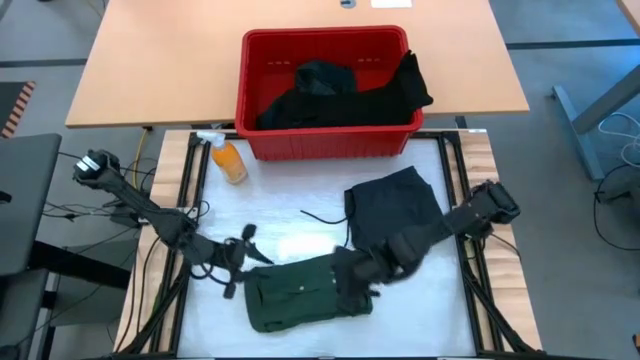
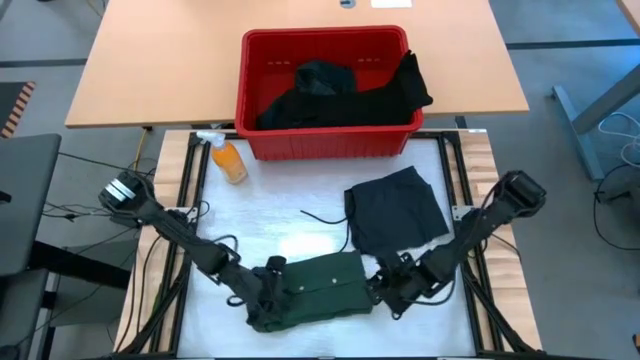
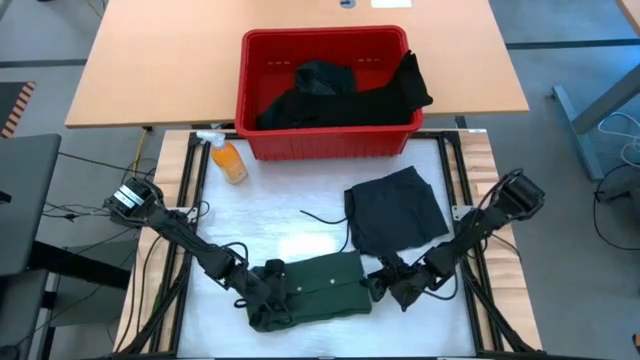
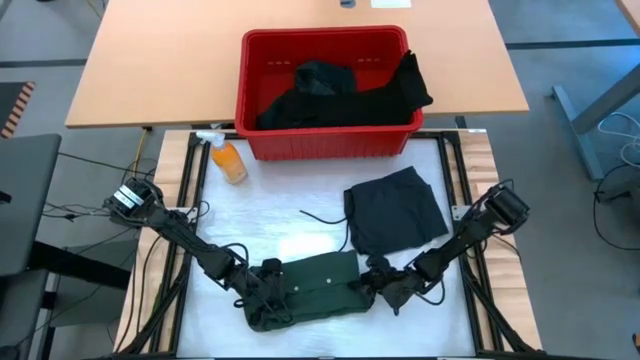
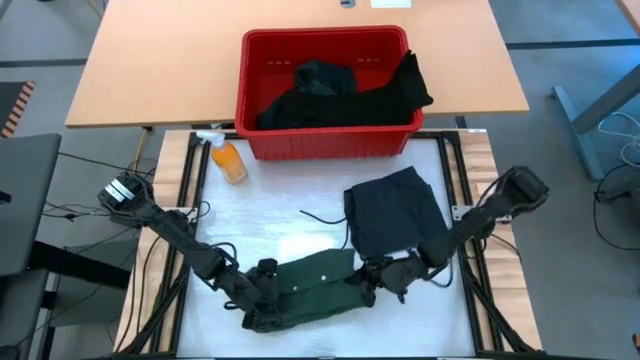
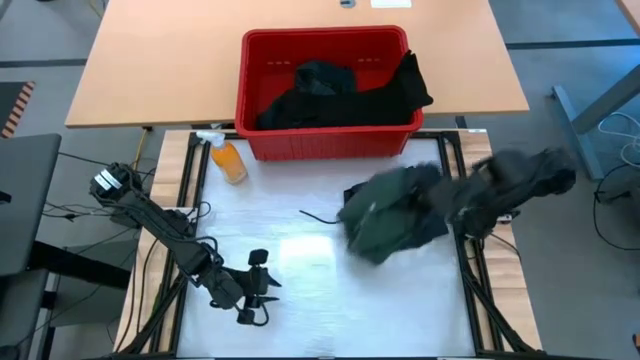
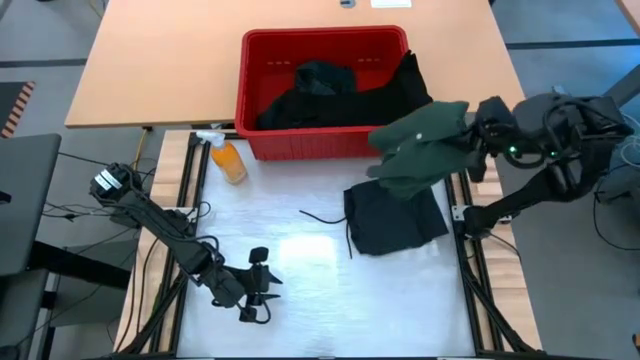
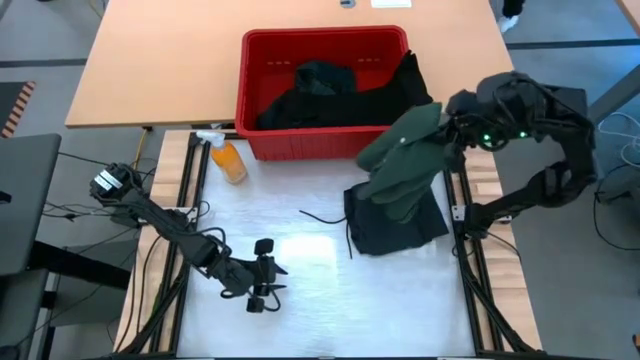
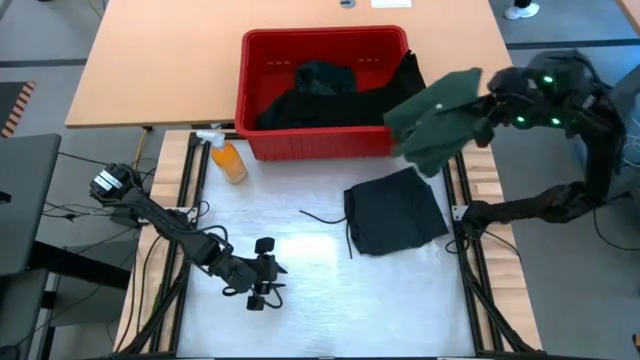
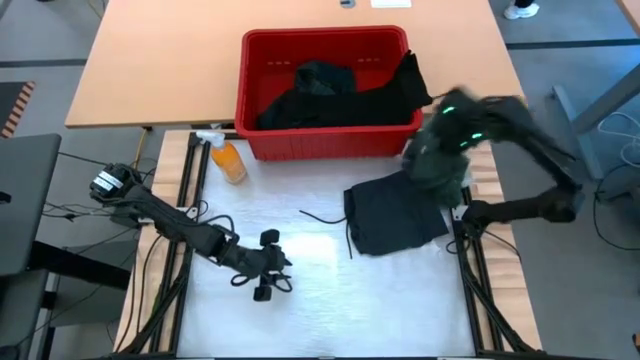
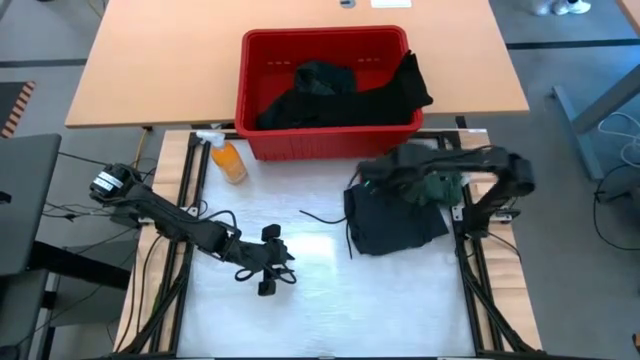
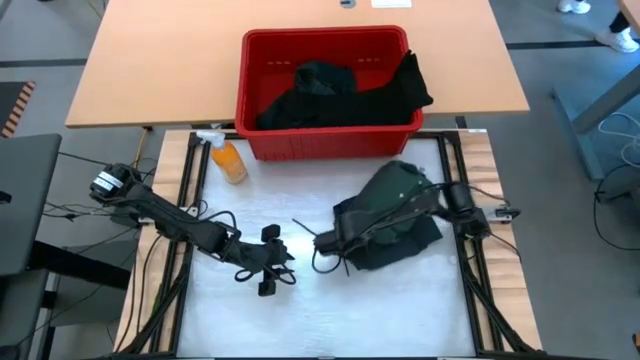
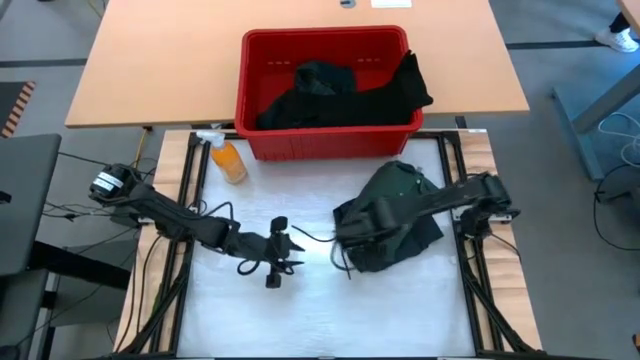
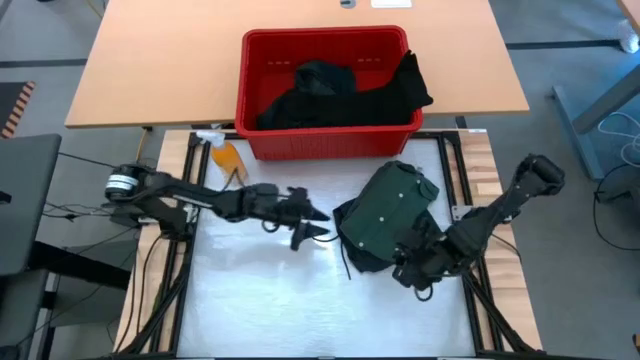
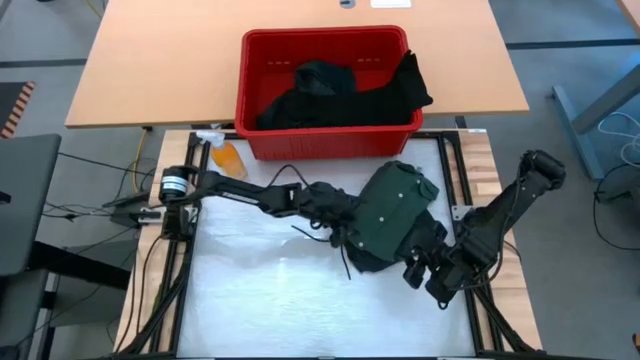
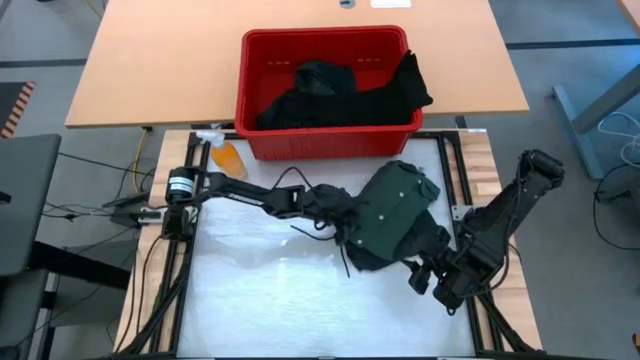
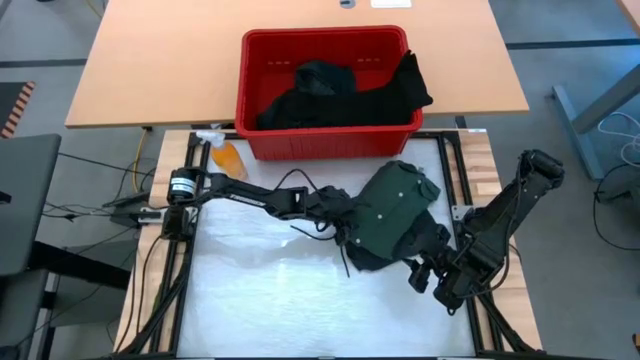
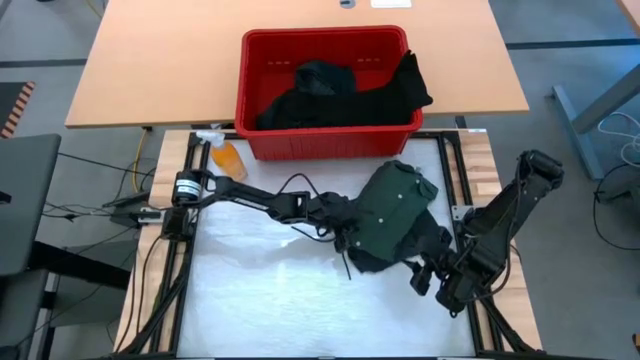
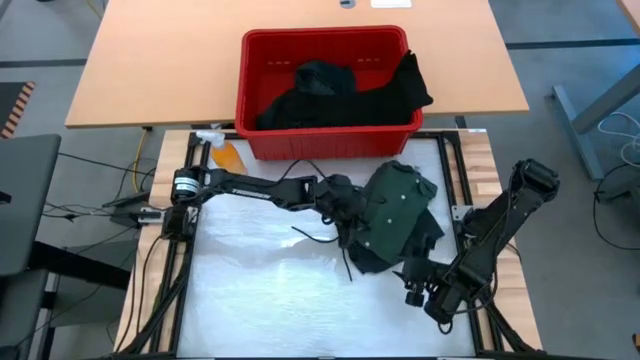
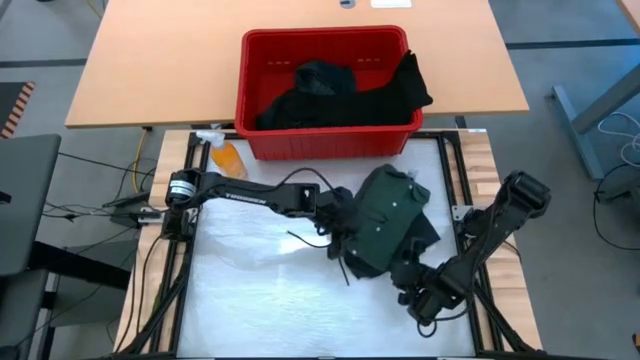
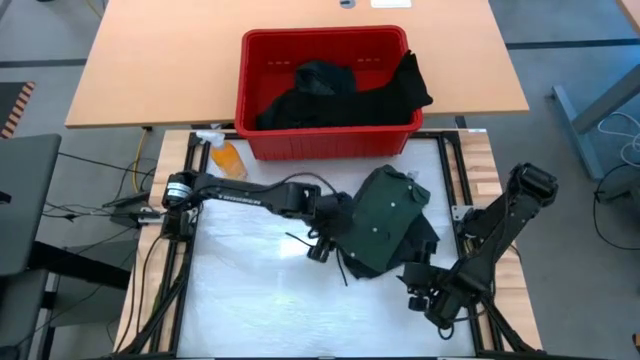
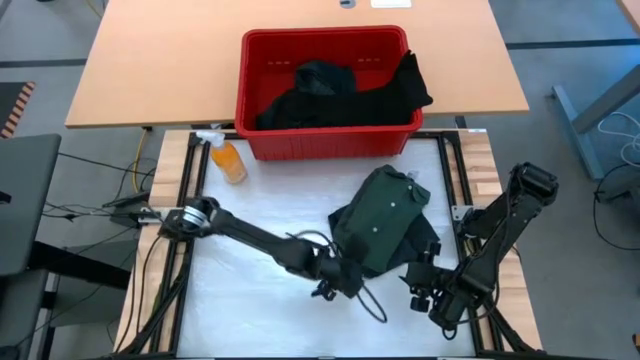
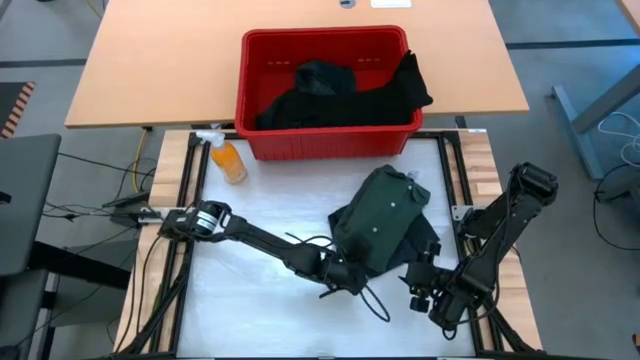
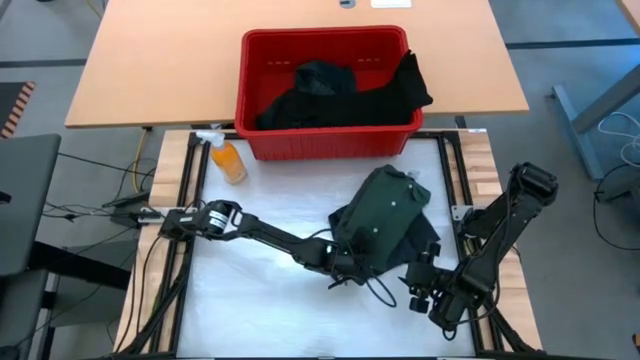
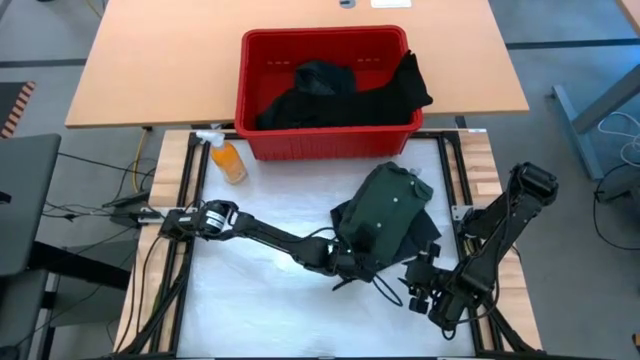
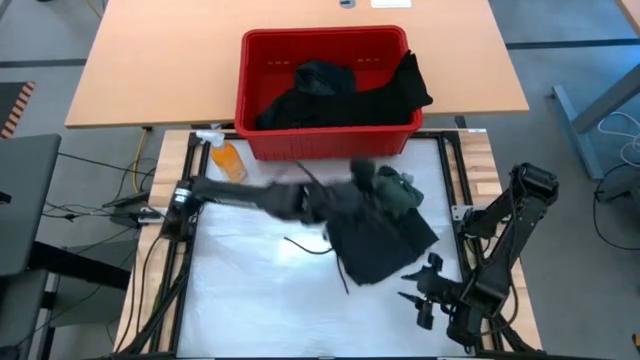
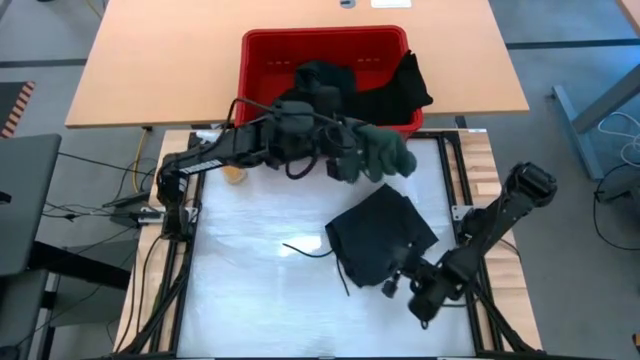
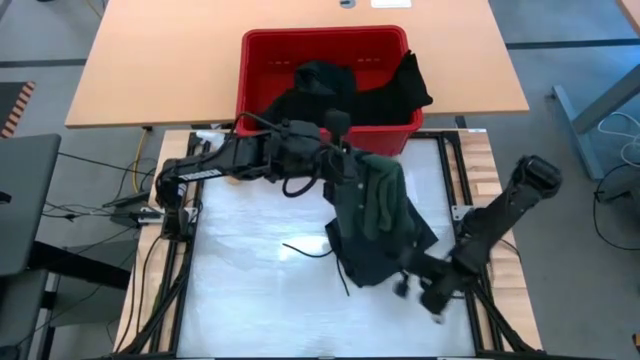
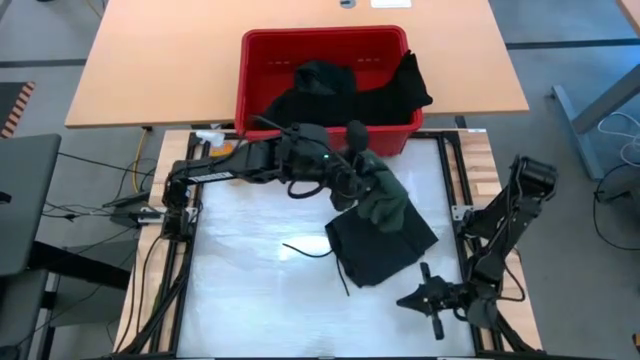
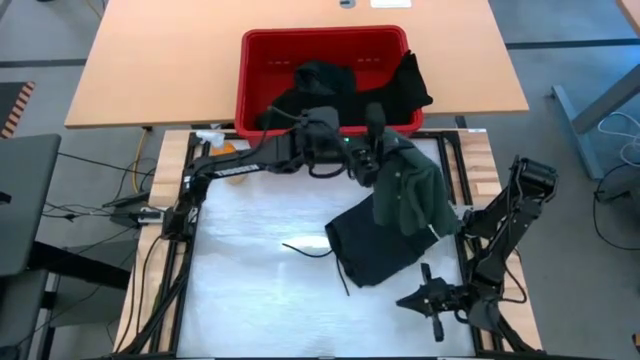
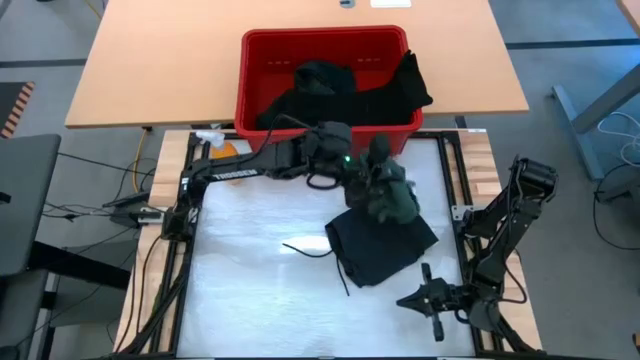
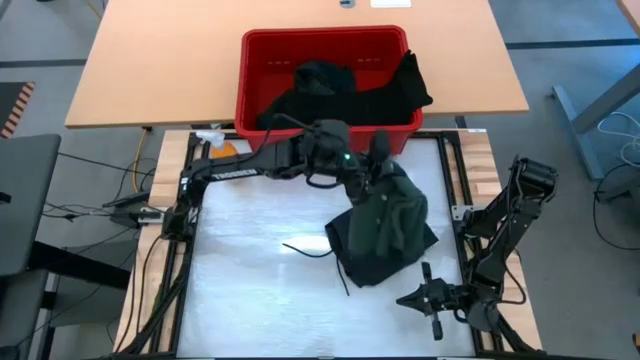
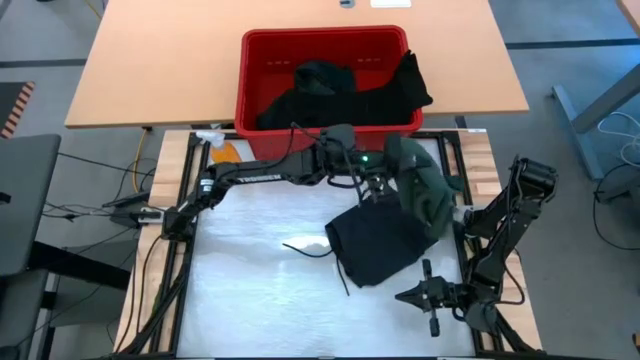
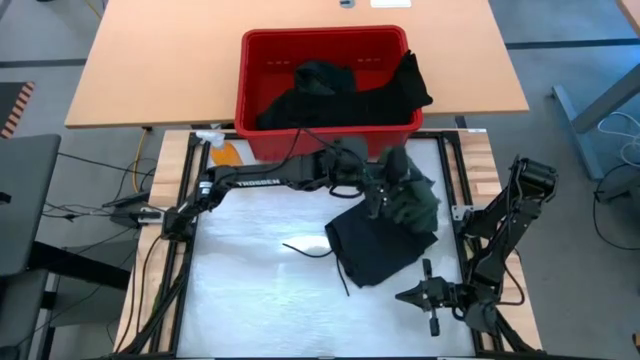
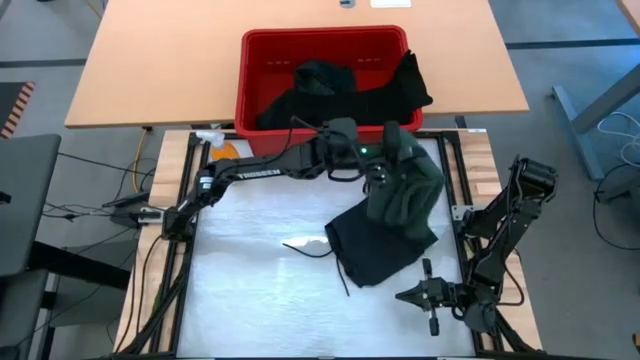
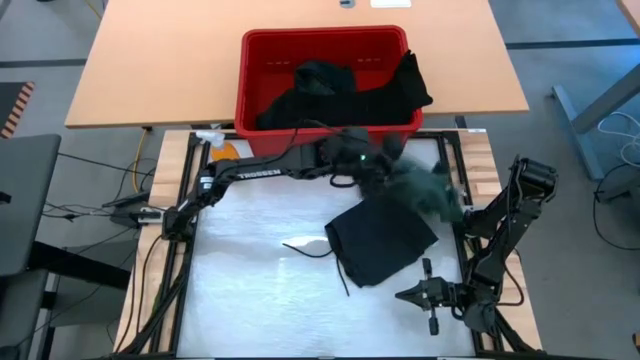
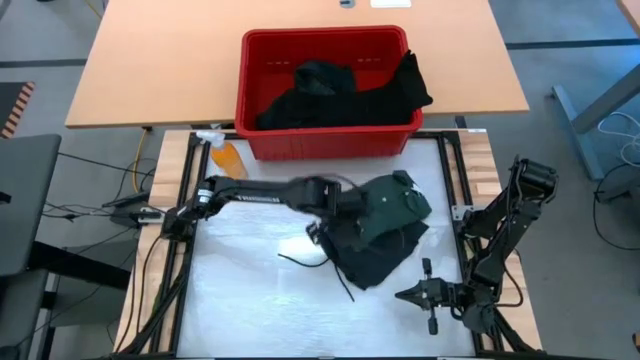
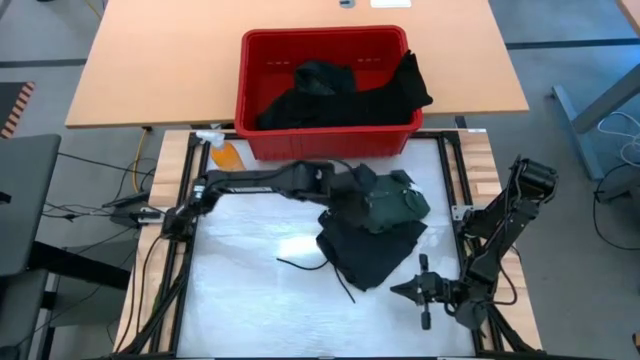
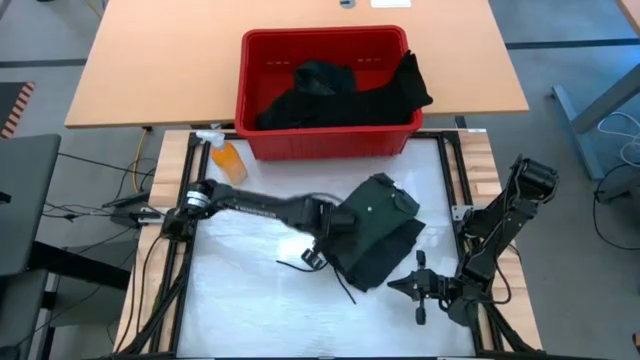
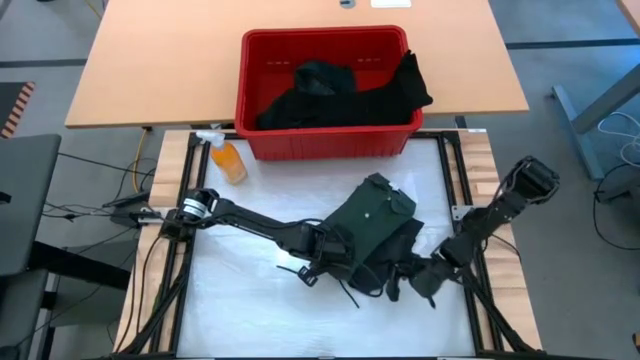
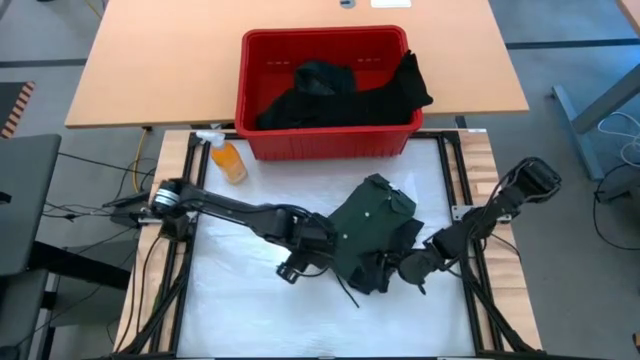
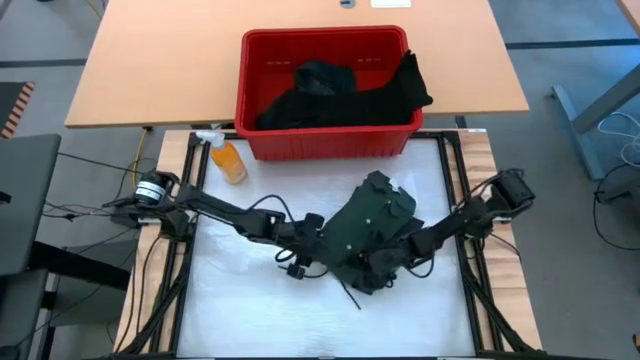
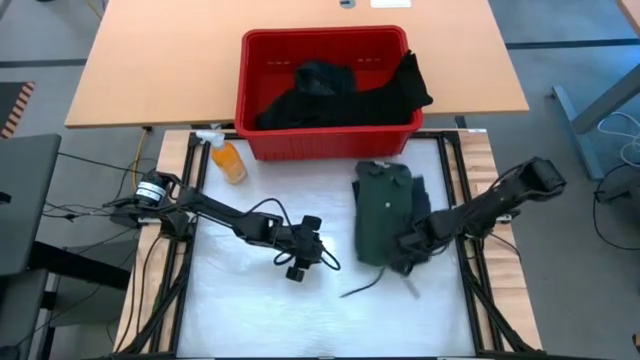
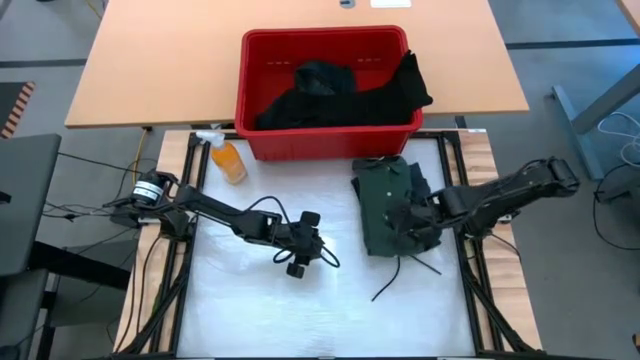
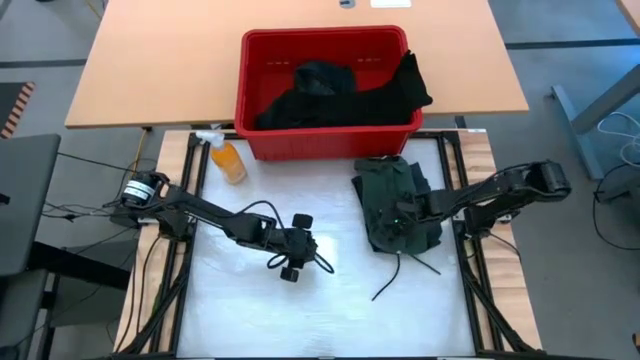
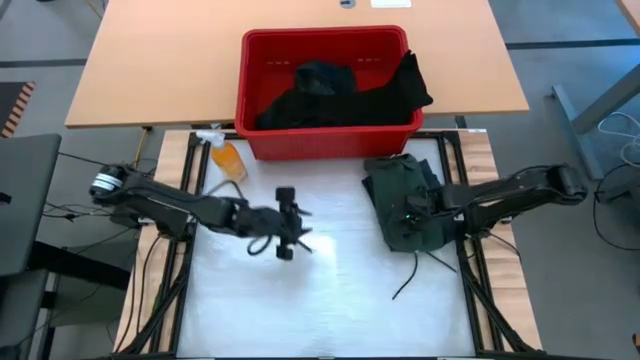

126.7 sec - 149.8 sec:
Task: Fold laundry
Stack the folded dark green shirt on top of the folded black shorts
